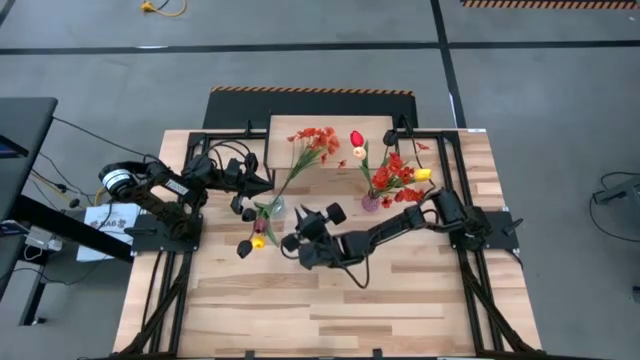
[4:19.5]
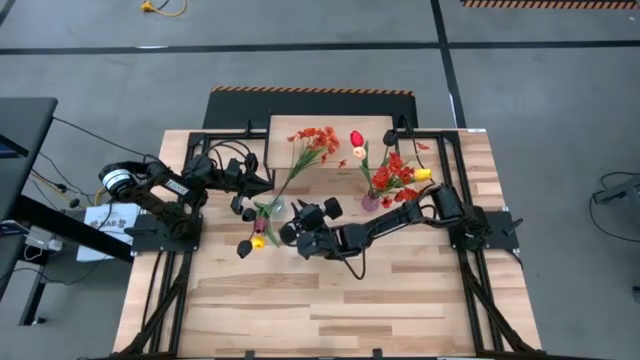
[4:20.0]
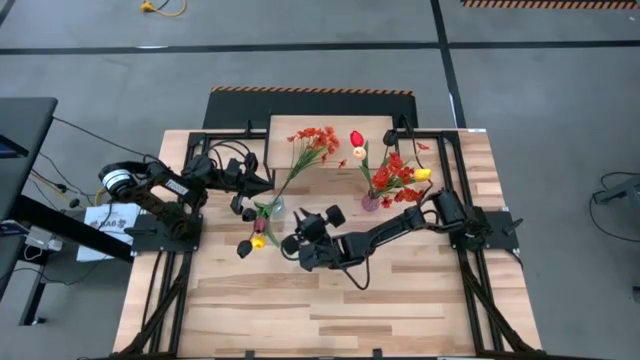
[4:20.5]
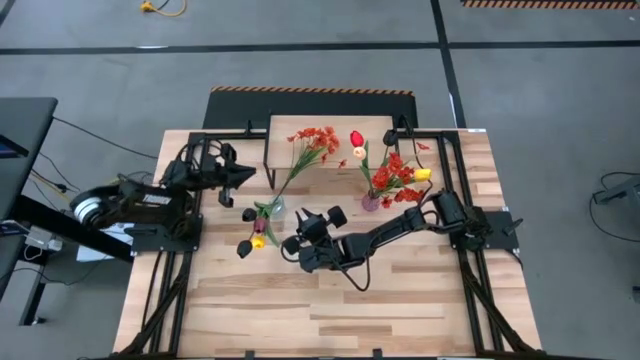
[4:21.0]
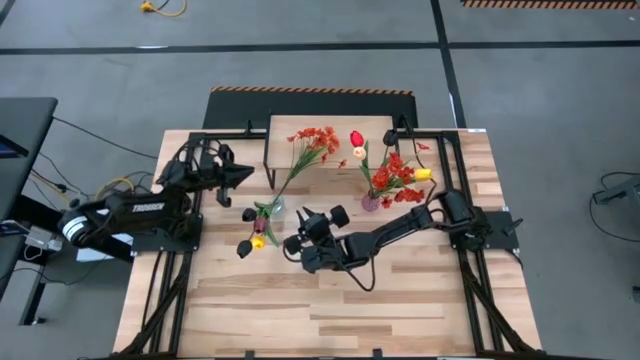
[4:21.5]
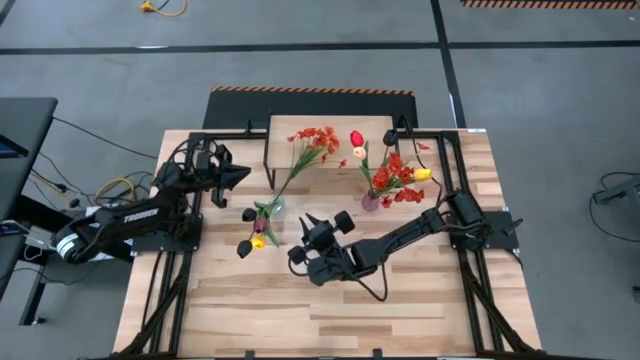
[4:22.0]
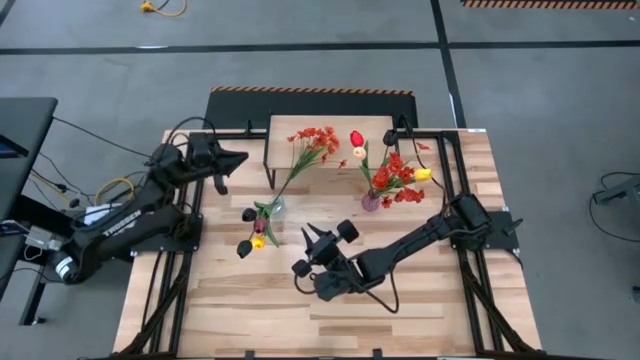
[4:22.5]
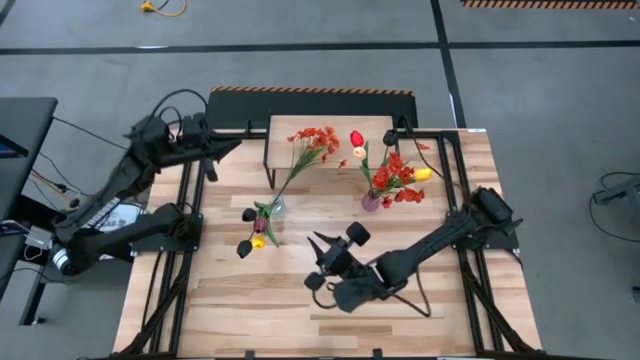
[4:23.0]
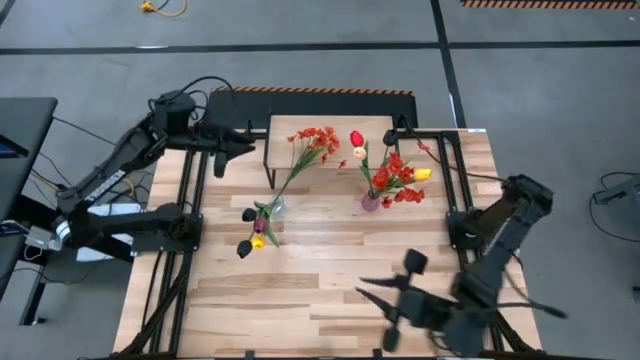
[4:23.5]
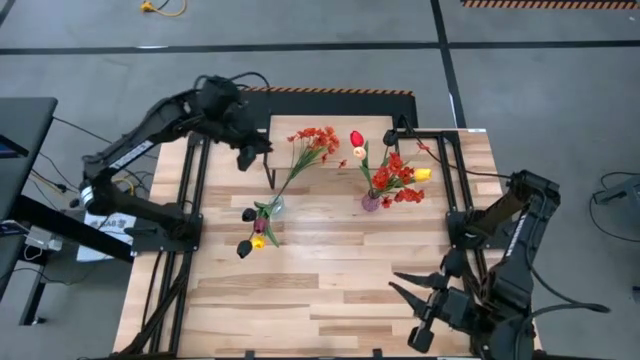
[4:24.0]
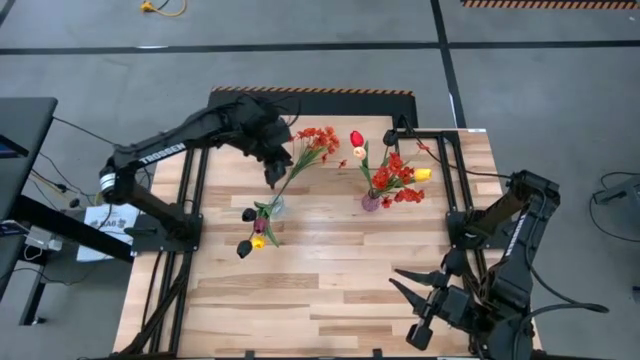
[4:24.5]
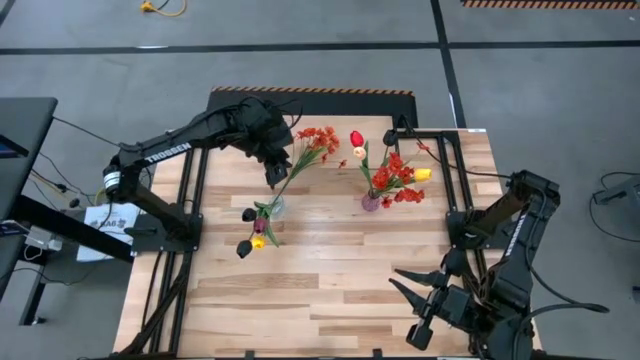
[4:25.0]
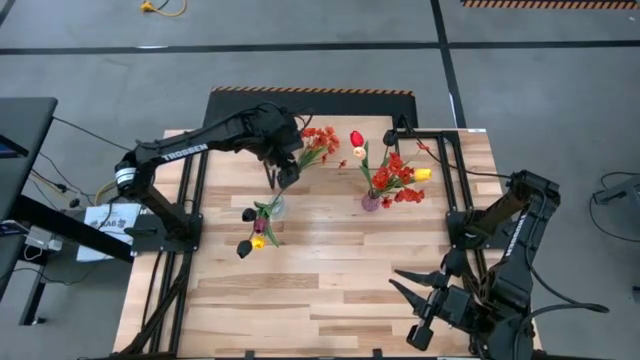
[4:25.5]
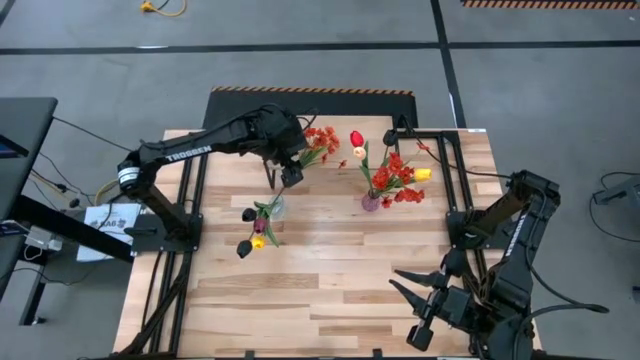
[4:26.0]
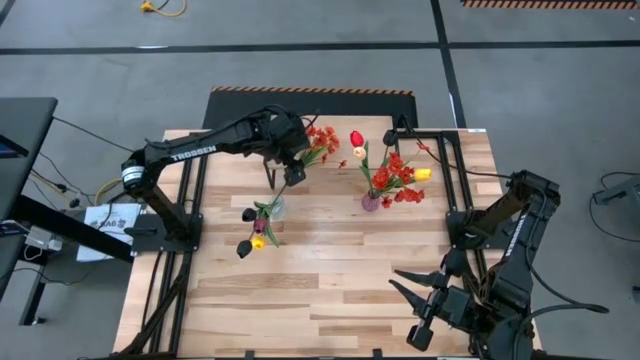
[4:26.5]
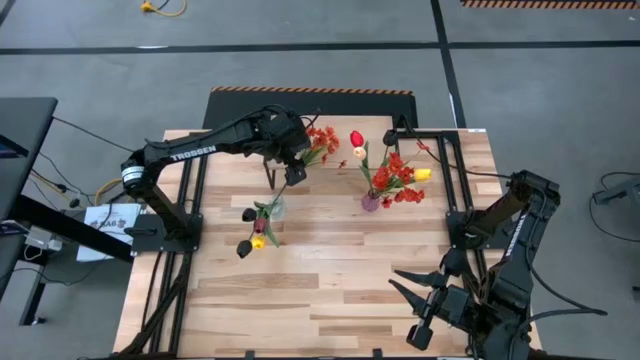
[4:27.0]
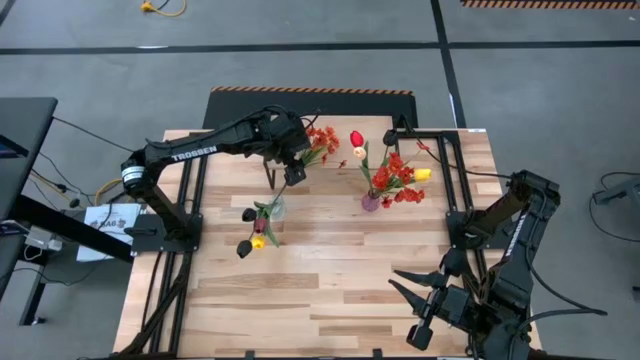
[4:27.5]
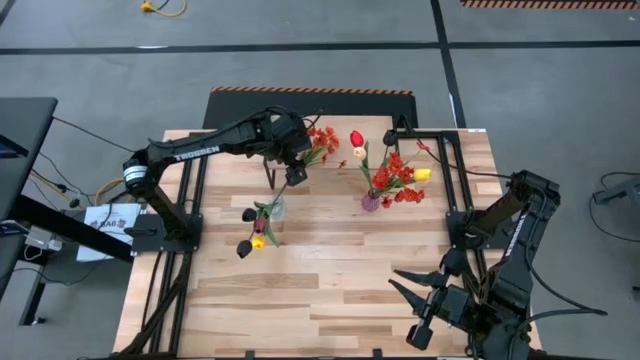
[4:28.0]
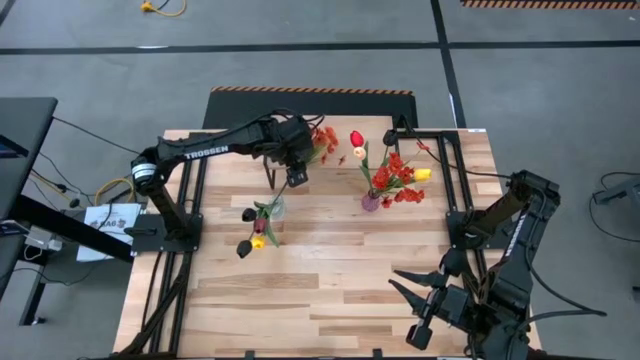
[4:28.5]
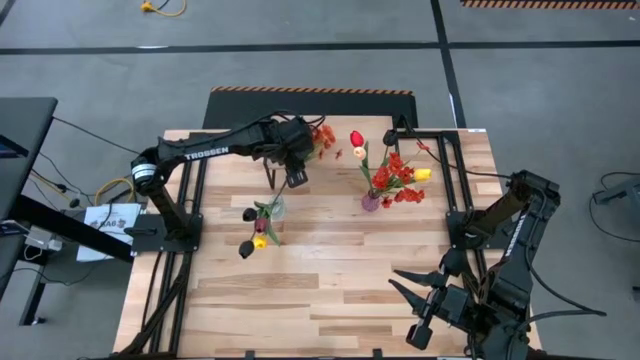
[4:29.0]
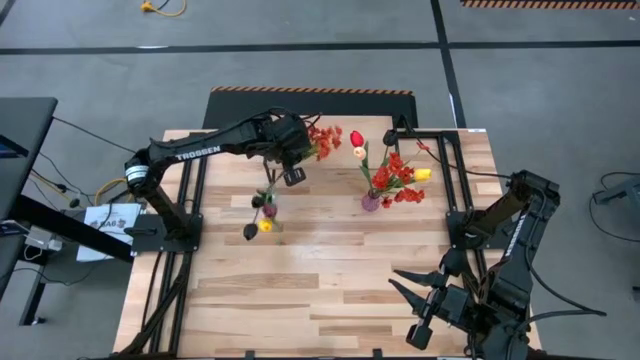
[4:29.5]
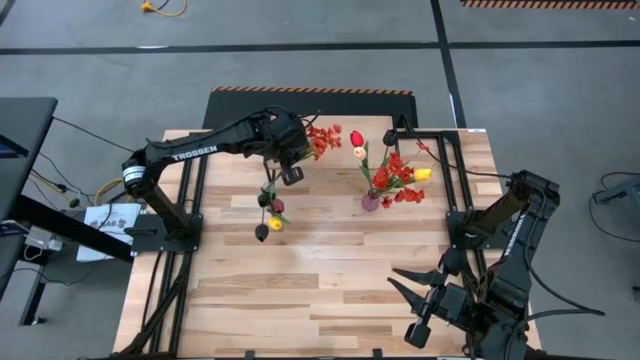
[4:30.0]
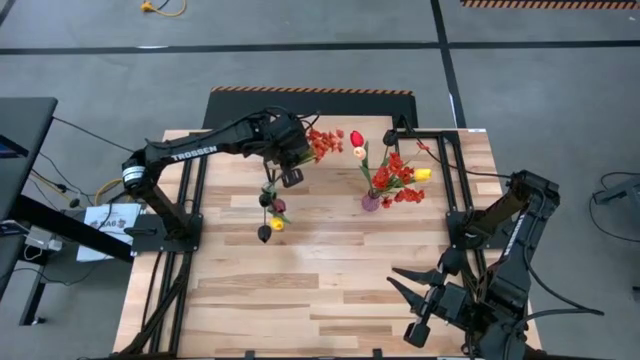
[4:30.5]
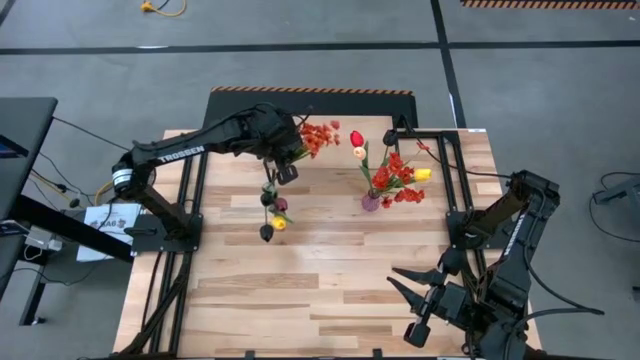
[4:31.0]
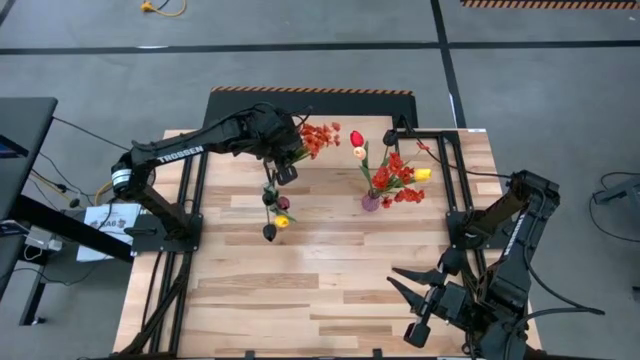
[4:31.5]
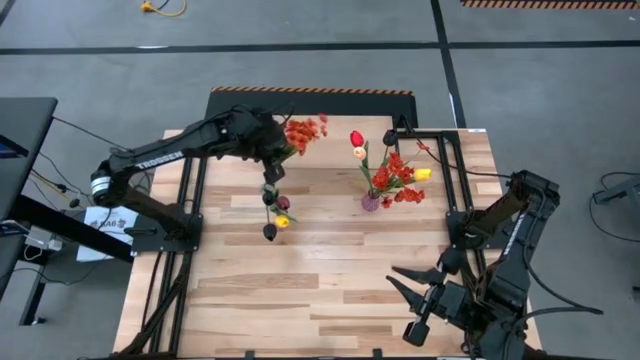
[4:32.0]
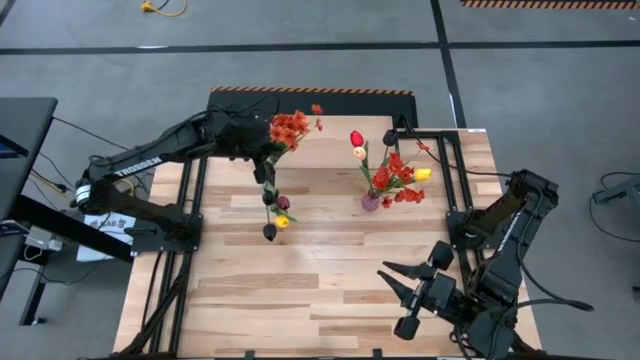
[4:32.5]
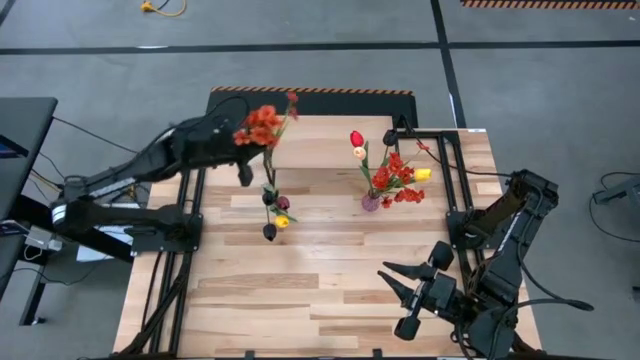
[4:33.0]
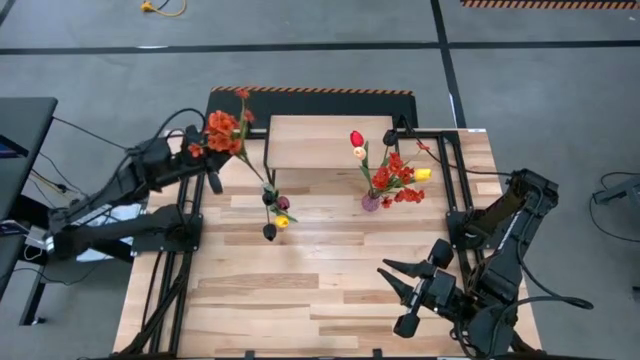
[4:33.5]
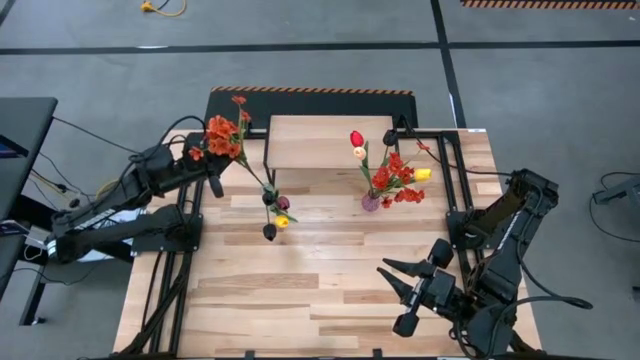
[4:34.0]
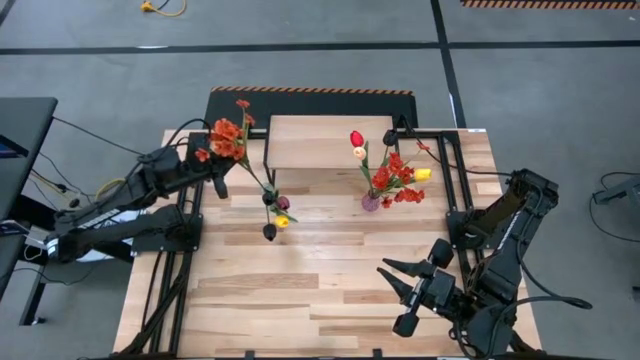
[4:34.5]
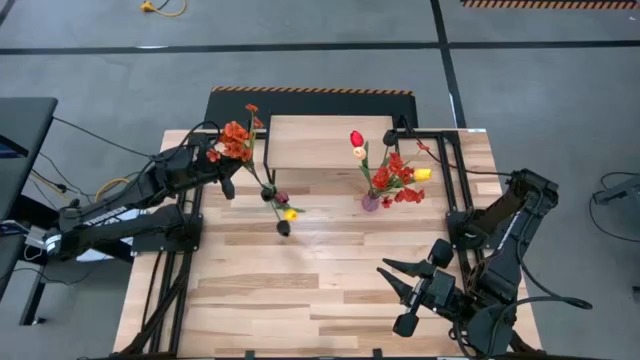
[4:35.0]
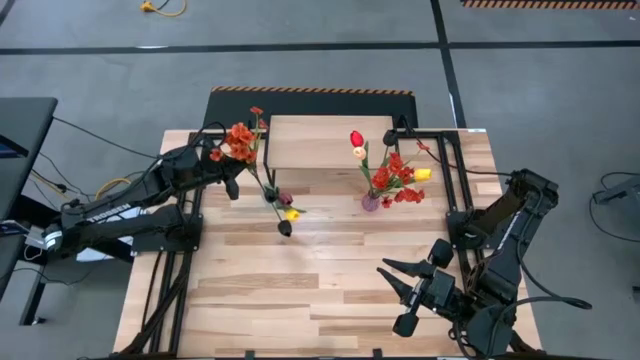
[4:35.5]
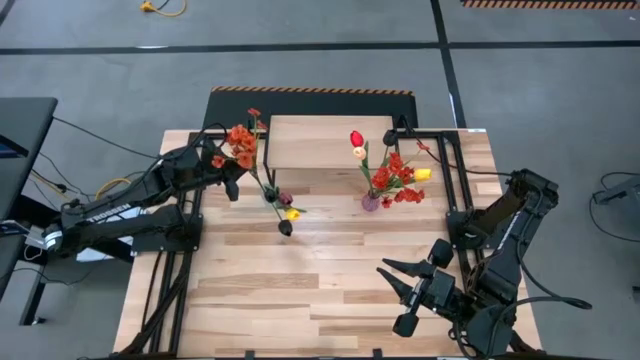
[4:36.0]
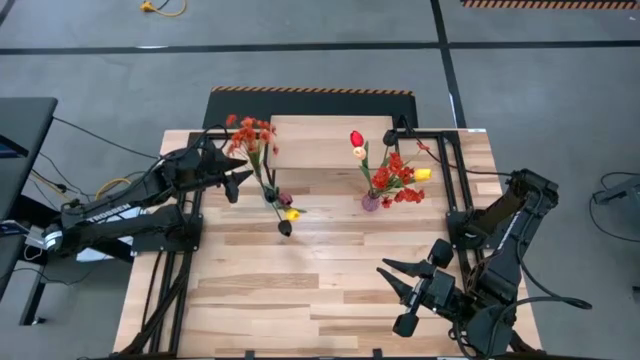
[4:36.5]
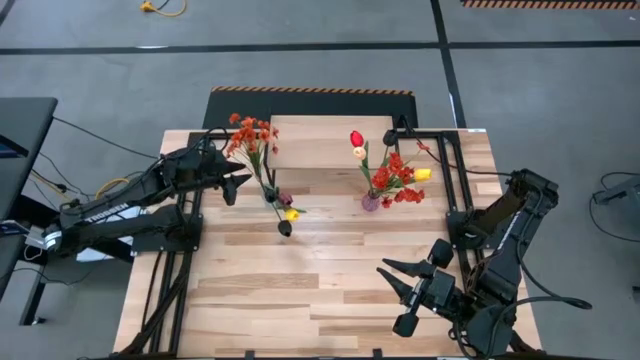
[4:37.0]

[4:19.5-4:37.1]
Task: Pick and place flowers into a vace then onto a shelf
Put the red flower into the transparent vase

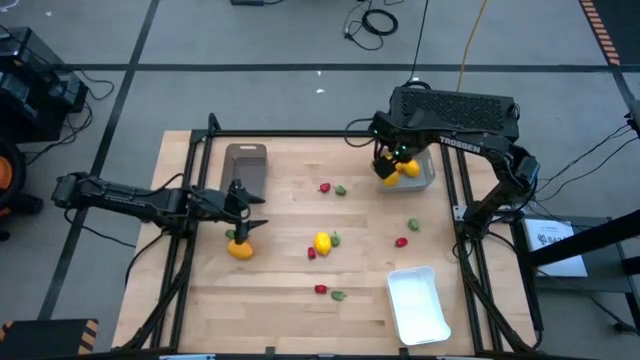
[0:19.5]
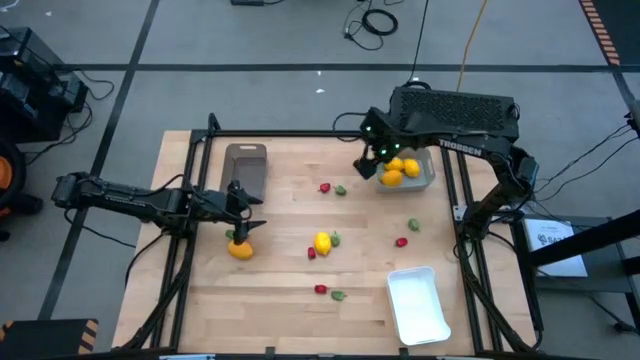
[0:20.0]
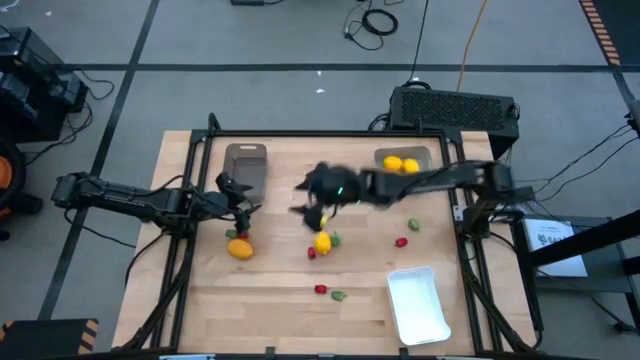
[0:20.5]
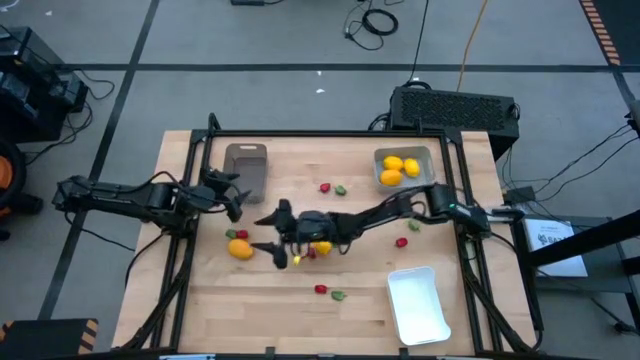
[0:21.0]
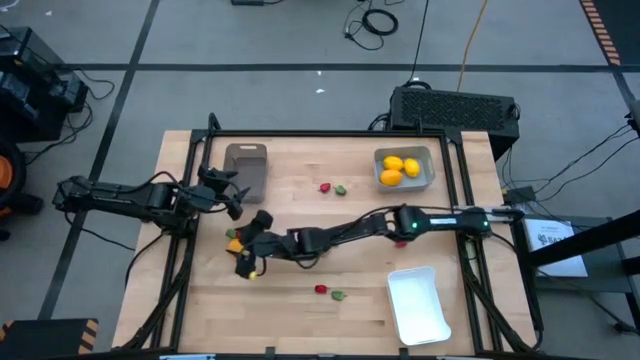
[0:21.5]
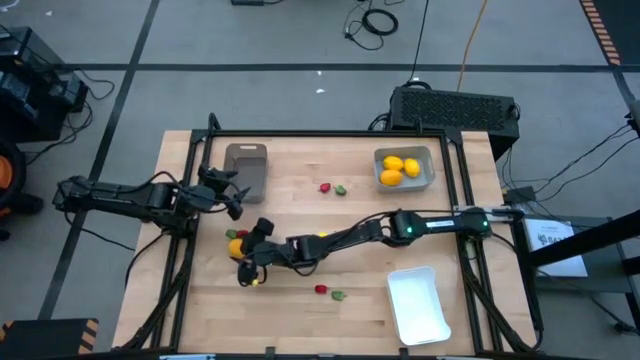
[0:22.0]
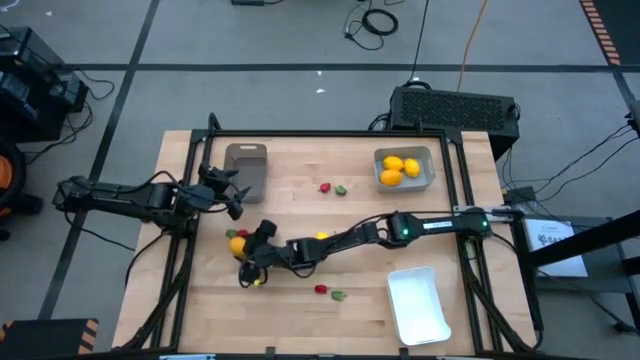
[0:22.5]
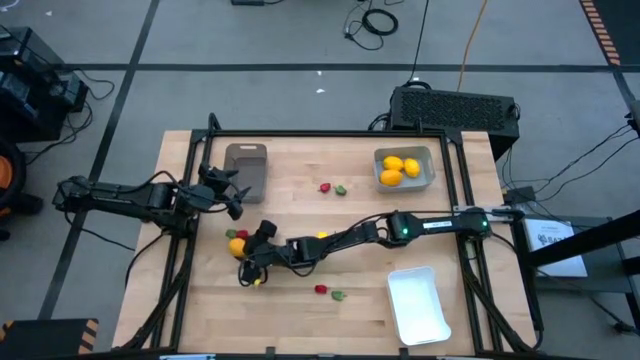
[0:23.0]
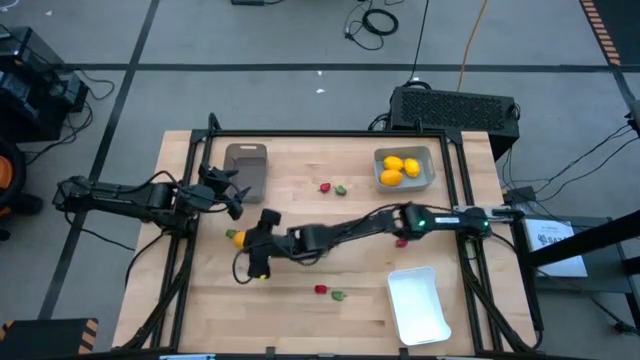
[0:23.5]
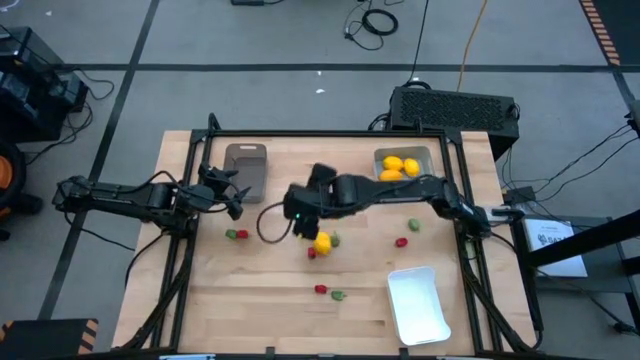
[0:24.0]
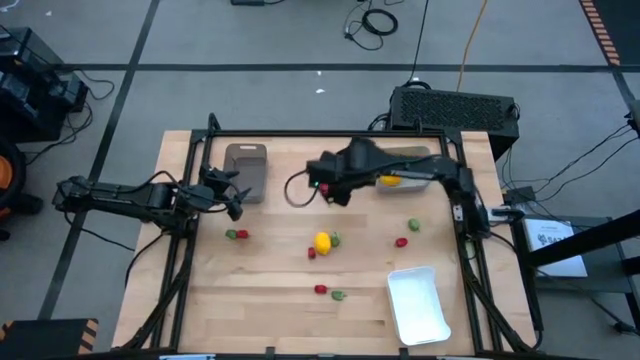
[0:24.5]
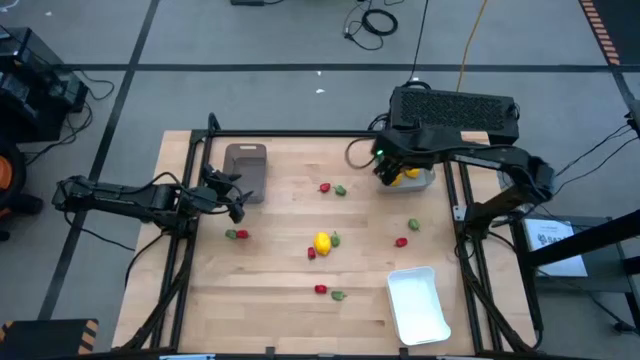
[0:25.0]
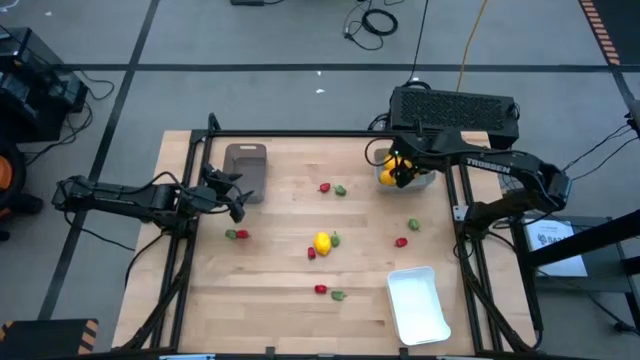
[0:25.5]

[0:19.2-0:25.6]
Task: Sort produce into baskets
Put the left yellow lemon into the gray bin
